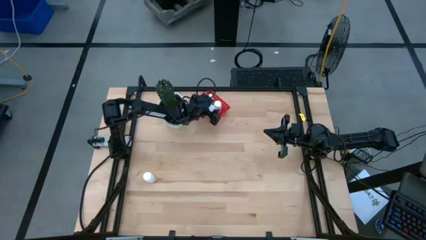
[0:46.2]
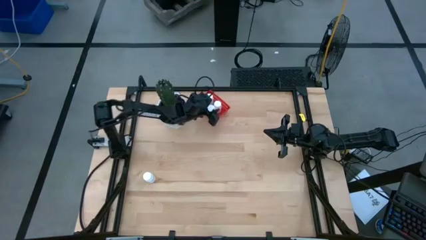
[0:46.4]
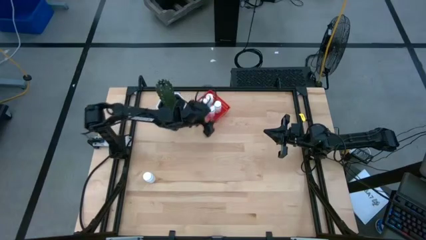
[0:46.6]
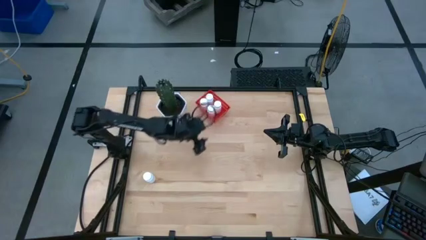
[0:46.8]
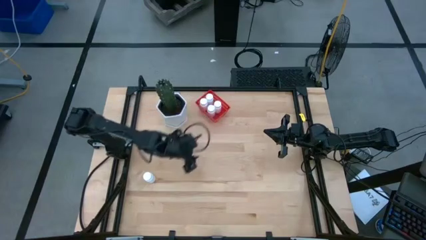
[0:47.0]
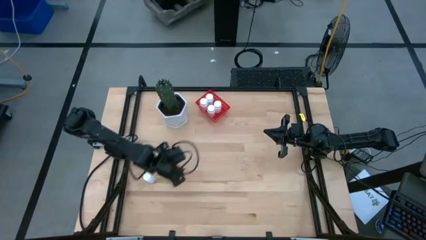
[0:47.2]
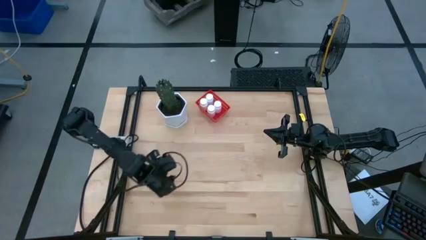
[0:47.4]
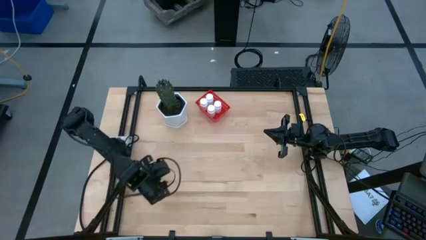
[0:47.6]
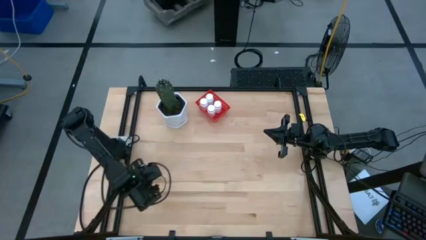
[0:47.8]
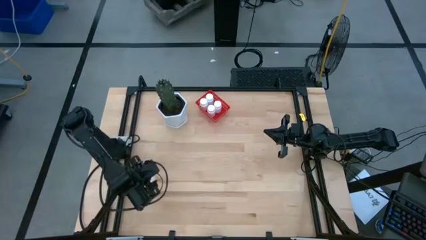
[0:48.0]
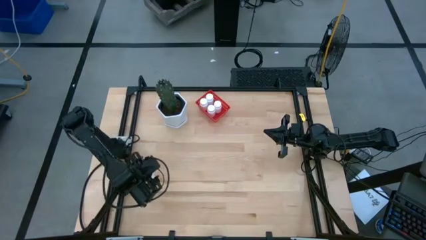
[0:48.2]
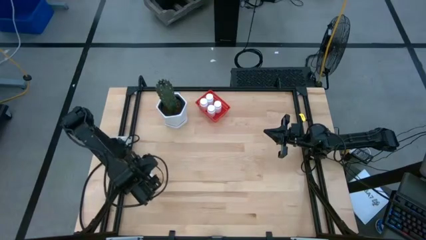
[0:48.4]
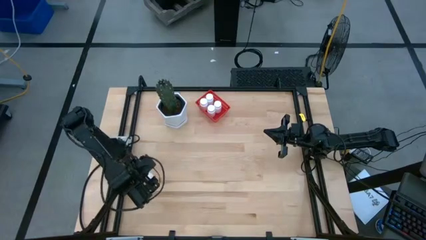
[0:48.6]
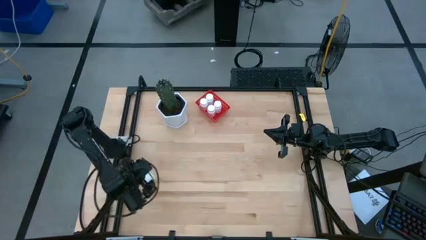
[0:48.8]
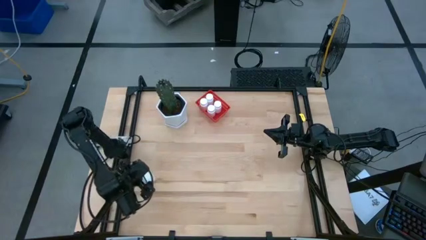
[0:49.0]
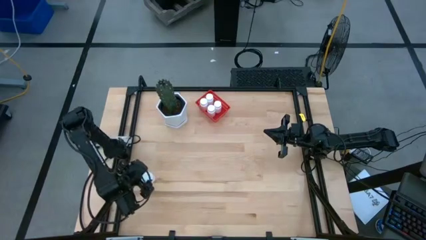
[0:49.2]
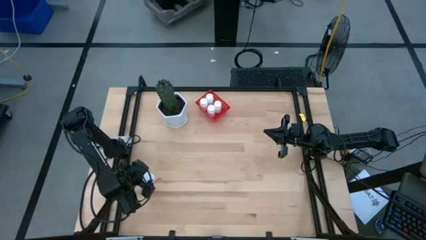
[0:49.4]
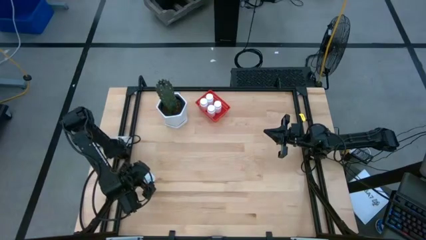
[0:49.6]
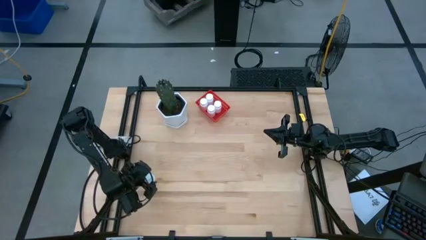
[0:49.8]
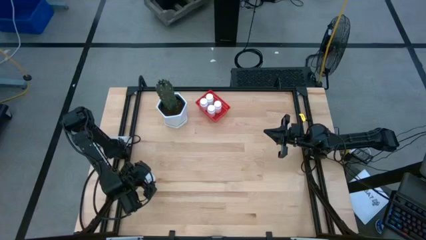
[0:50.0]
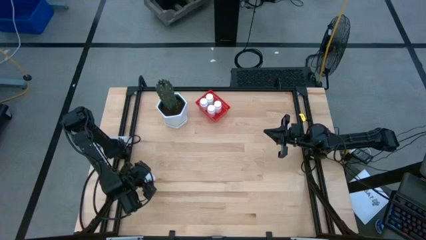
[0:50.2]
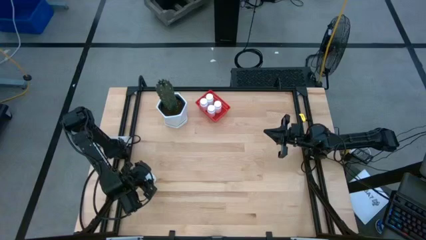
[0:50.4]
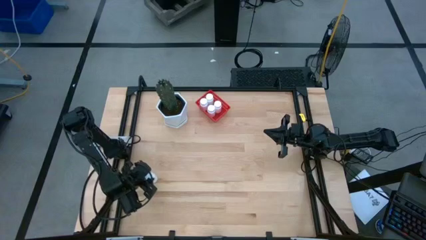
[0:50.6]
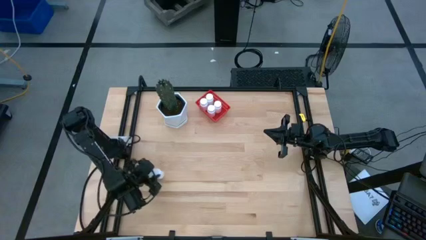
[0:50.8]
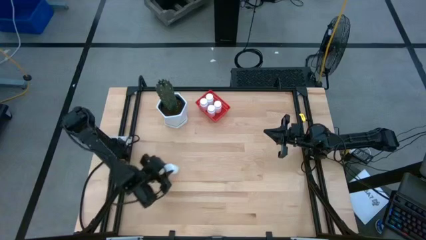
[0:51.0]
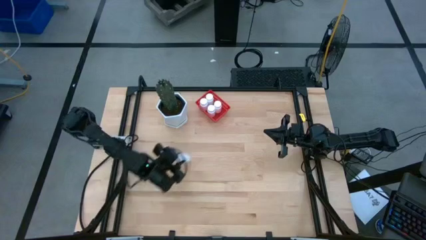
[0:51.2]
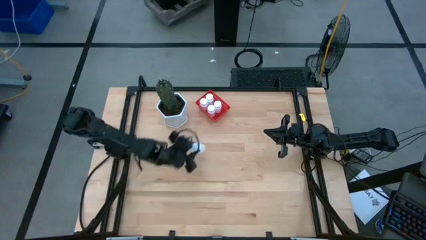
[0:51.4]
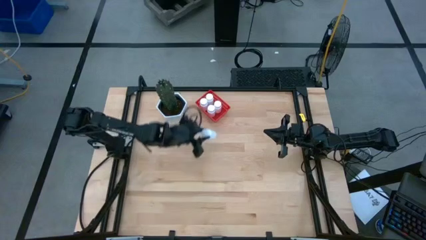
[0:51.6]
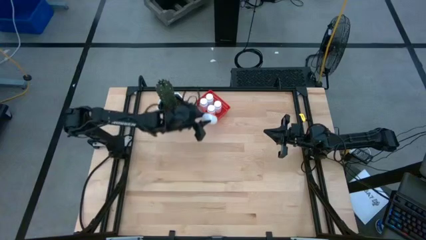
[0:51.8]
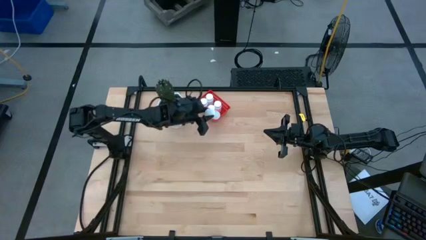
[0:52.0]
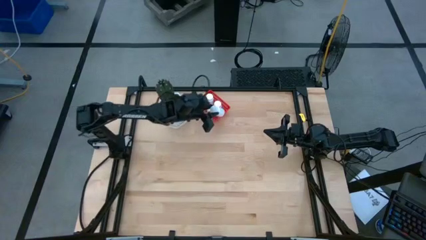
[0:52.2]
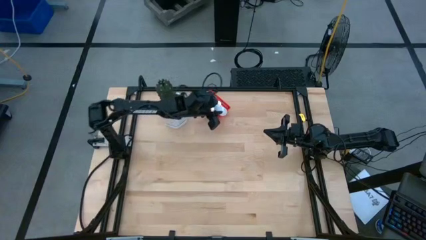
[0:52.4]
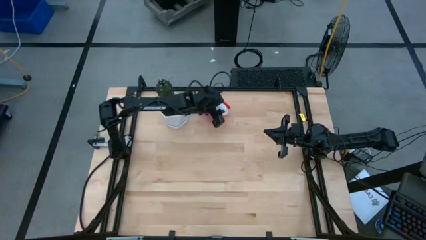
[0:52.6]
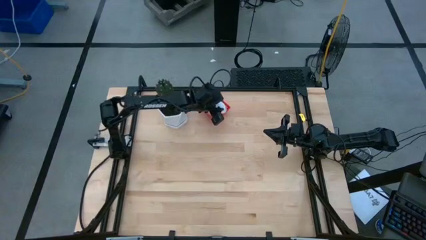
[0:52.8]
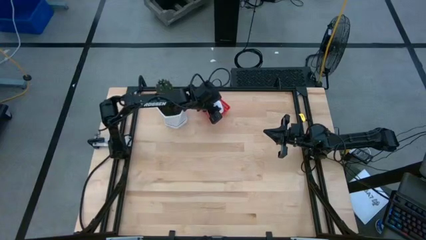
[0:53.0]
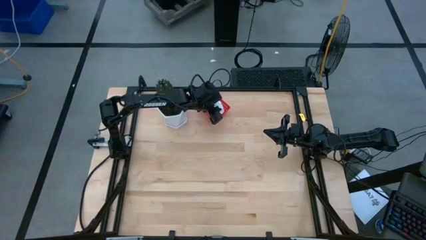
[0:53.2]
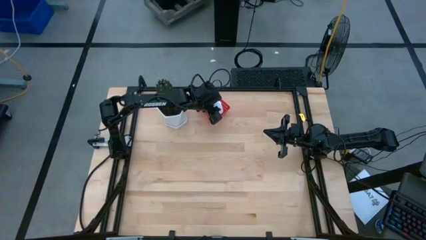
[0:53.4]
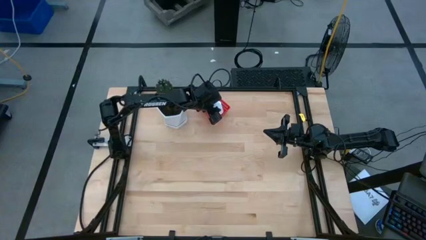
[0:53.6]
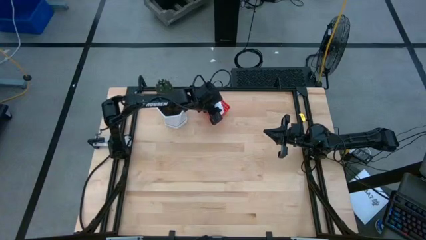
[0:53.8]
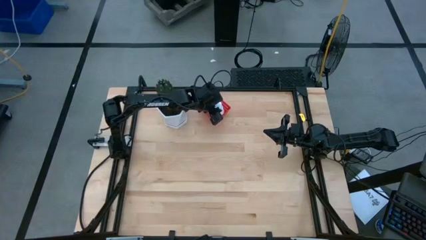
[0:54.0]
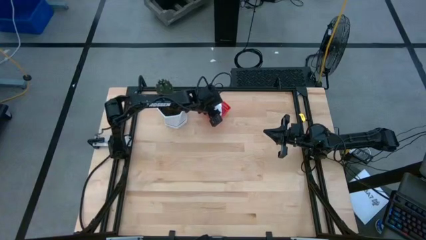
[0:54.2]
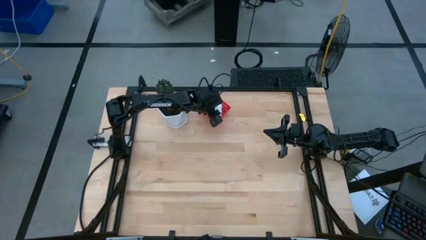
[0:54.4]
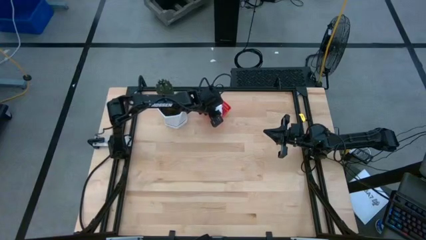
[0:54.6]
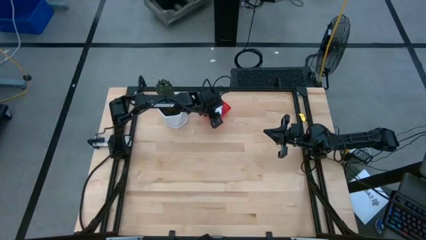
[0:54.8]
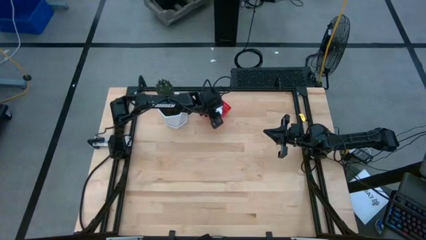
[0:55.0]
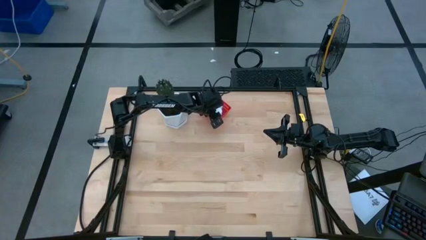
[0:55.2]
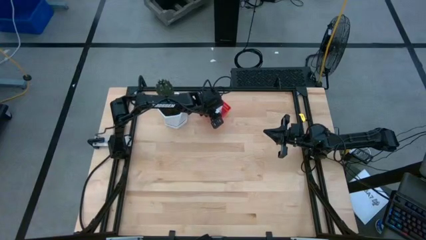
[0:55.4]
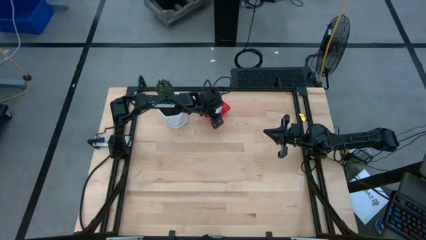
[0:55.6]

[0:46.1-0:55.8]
Task: Pick and place pill bottles into a basket
Put the white pill bottle into the red bin

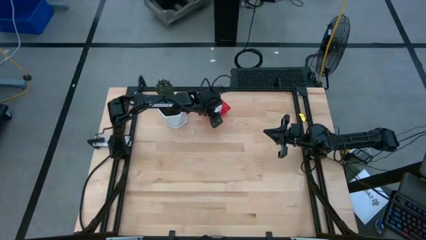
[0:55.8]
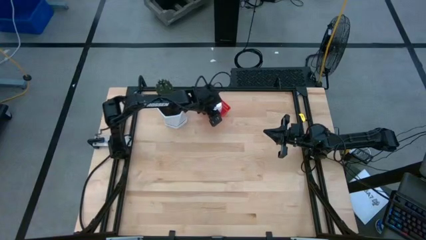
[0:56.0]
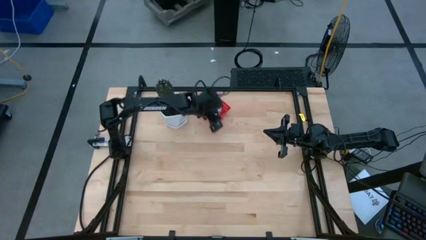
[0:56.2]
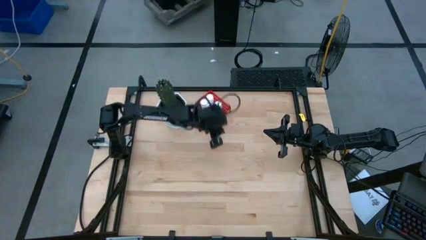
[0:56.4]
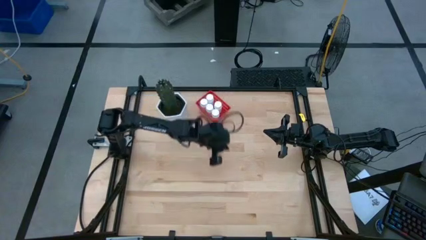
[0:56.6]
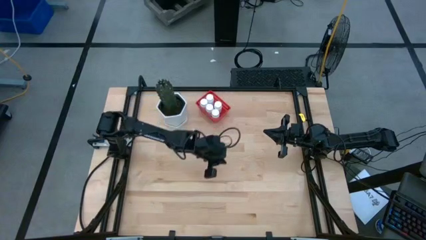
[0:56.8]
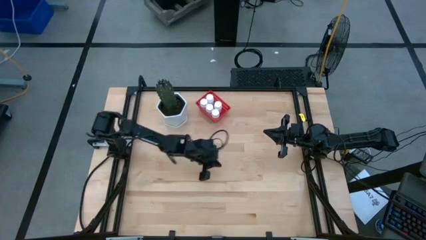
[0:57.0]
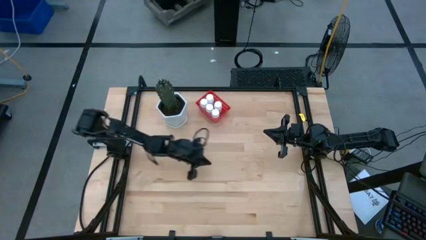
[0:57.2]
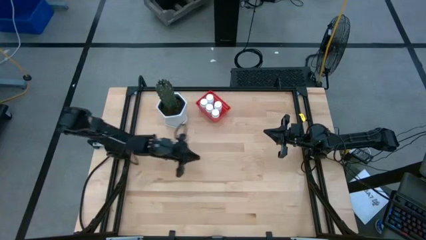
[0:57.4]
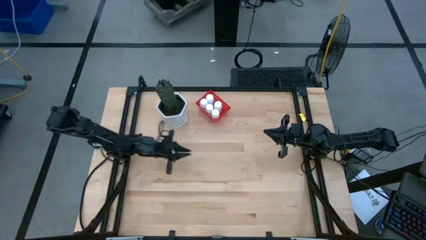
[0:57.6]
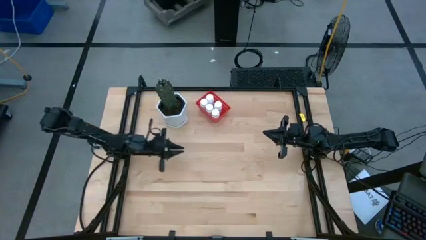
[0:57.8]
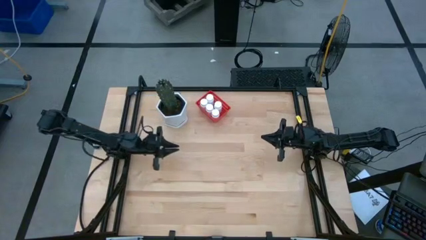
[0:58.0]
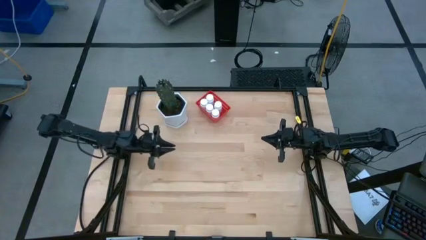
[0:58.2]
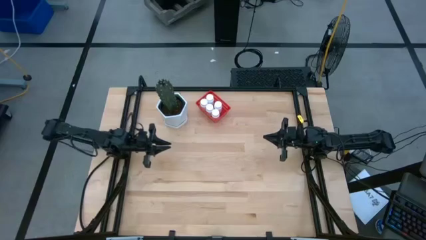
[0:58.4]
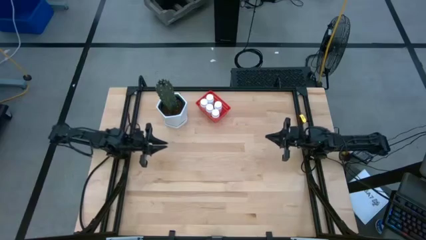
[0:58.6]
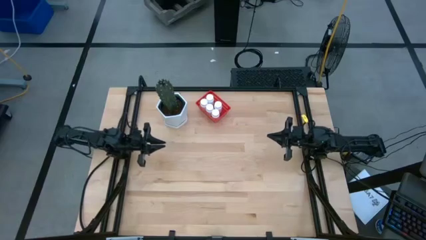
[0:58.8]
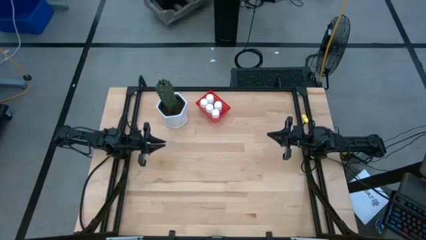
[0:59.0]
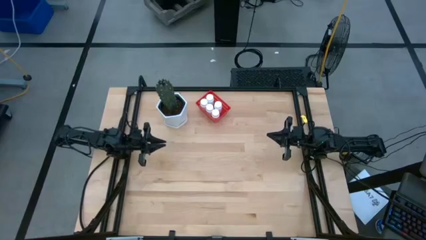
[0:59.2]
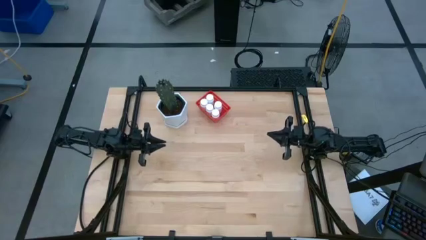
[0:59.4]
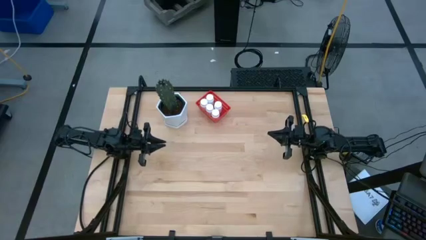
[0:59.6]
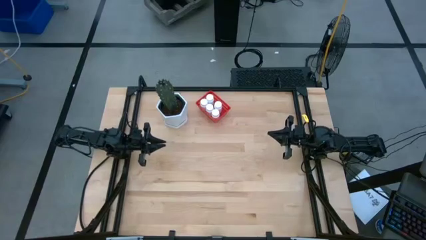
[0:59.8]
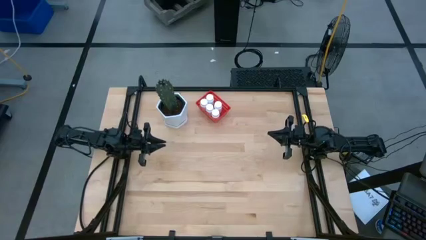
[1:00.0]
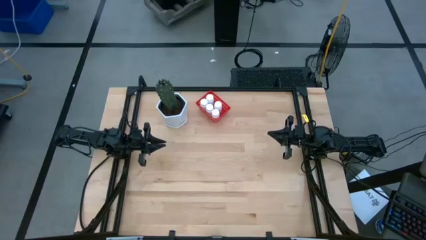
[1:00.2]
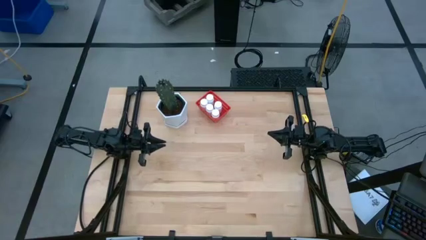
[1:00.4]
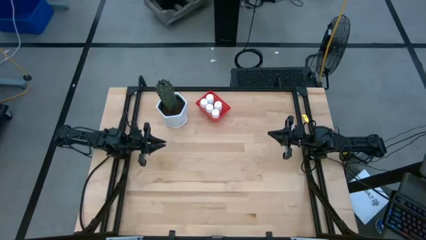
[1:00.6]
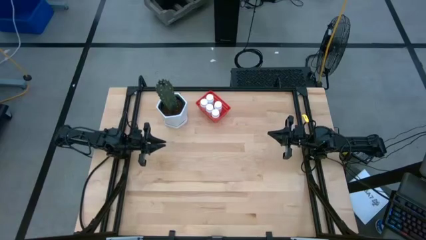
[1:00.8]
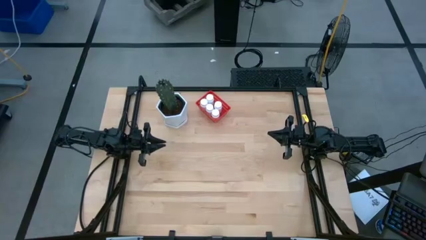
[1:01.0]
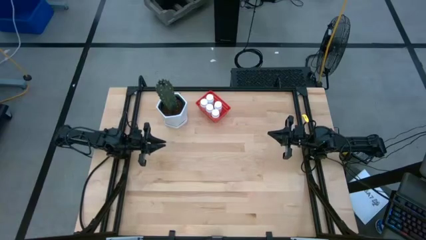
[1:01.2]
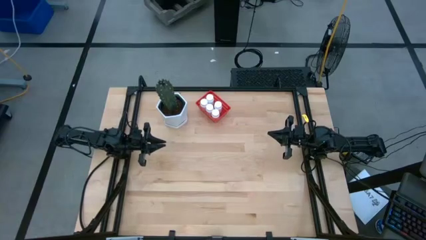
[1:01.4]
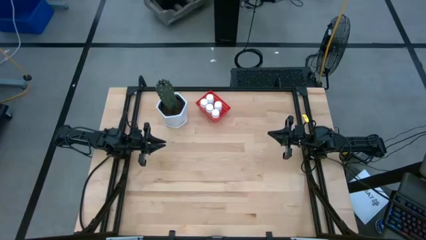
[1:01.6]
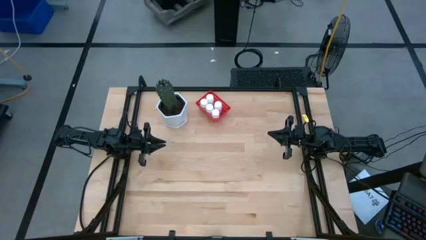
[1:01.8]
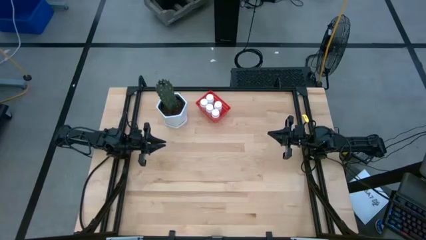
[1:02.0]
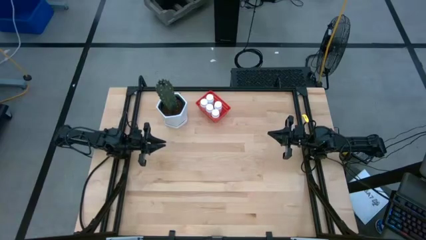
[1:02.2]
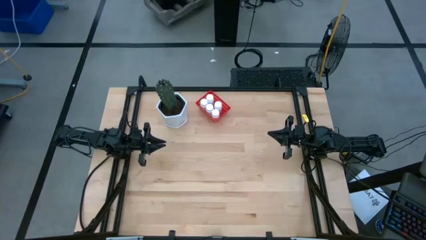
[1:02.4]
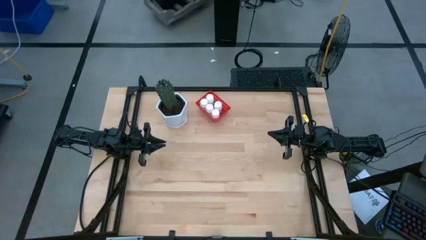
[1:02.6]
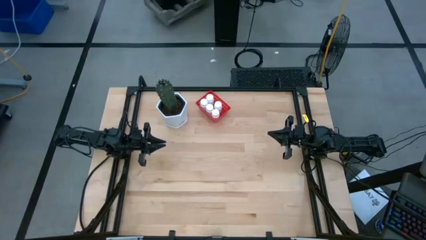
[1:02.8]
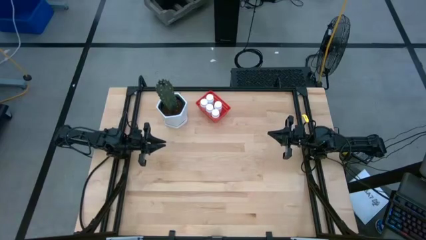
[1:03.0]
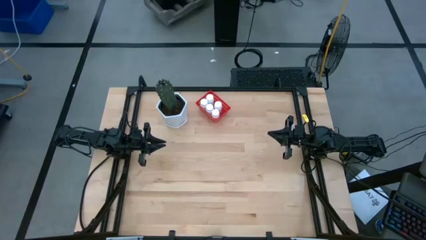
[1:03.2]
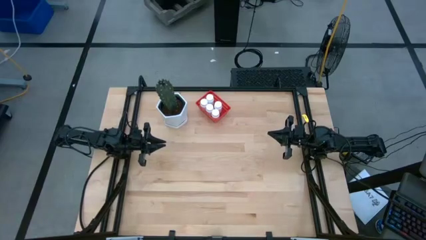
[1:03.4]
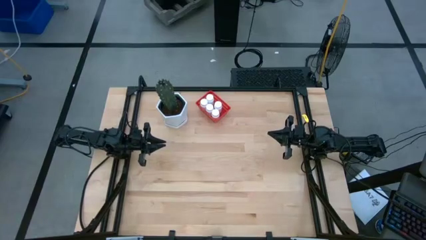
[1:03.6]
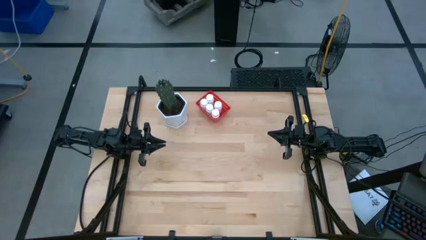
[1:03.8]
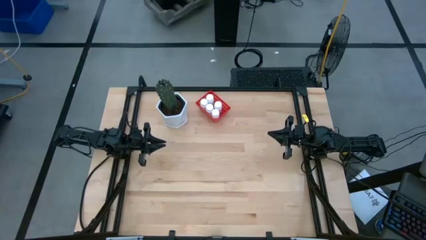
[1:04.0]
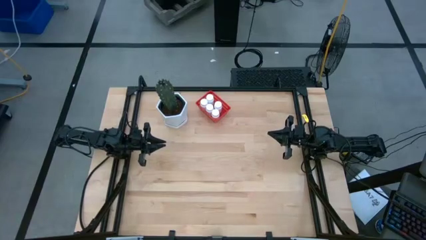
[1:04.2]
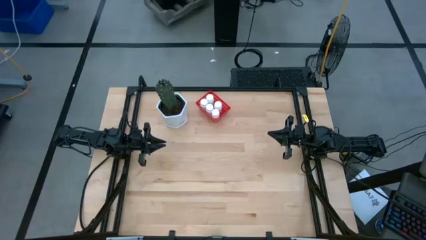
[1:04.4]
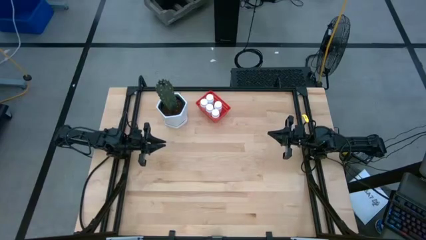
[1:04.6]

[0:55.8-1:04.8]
Return to Home Position
